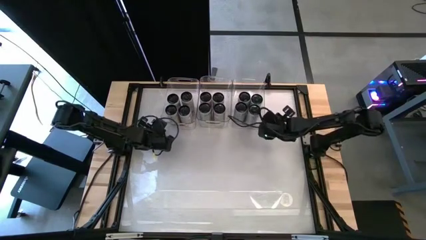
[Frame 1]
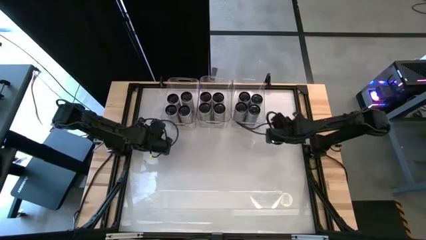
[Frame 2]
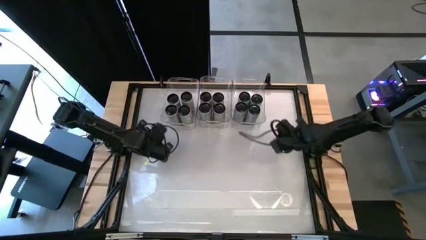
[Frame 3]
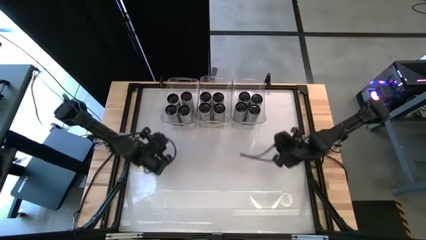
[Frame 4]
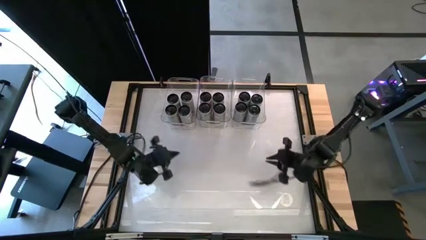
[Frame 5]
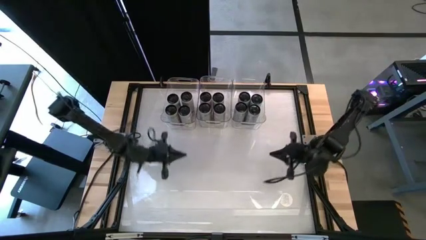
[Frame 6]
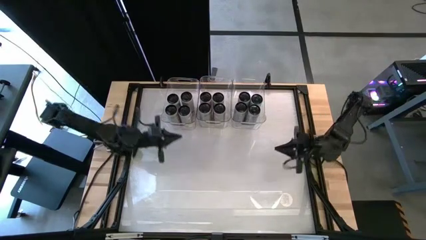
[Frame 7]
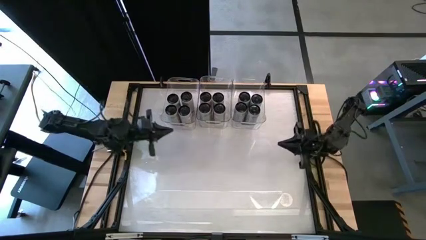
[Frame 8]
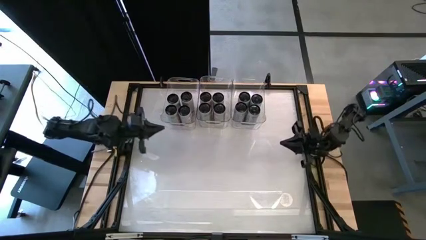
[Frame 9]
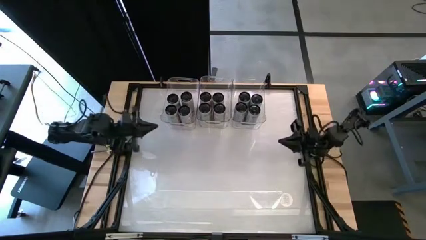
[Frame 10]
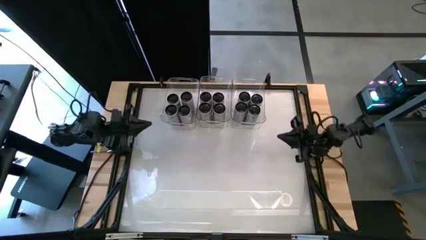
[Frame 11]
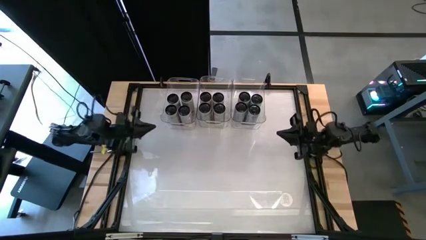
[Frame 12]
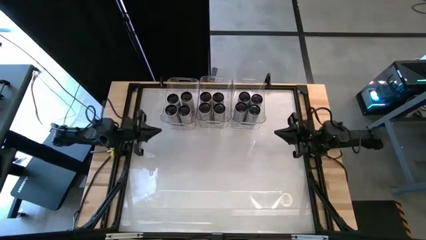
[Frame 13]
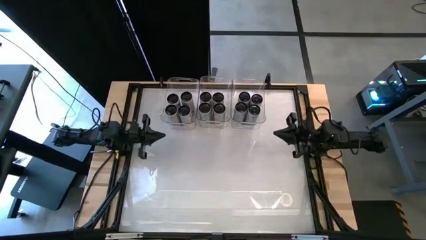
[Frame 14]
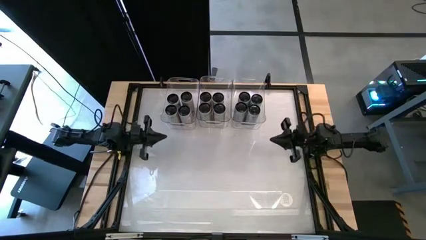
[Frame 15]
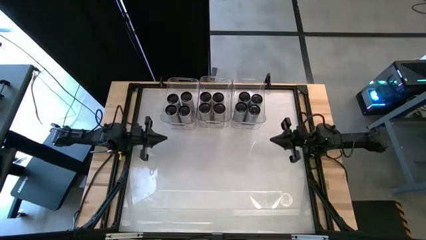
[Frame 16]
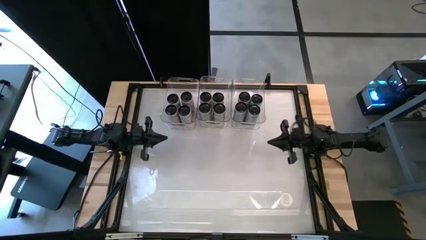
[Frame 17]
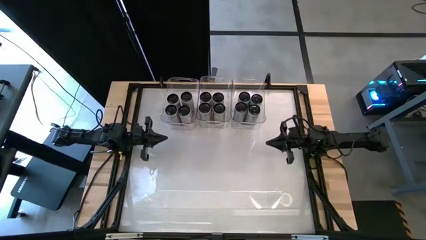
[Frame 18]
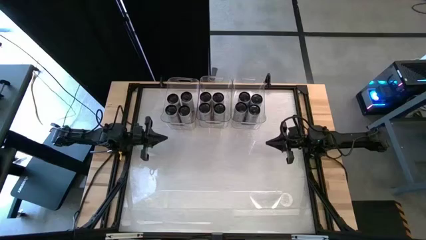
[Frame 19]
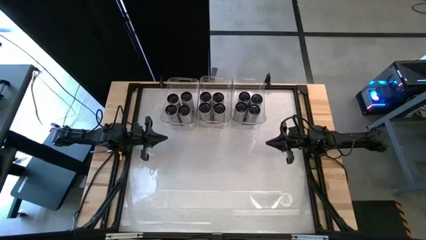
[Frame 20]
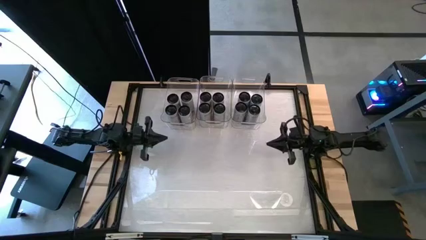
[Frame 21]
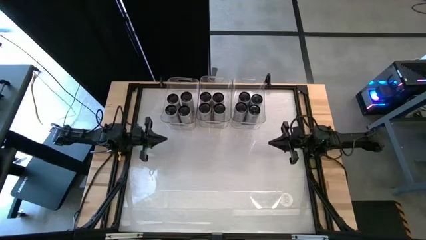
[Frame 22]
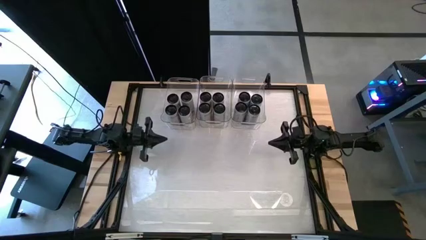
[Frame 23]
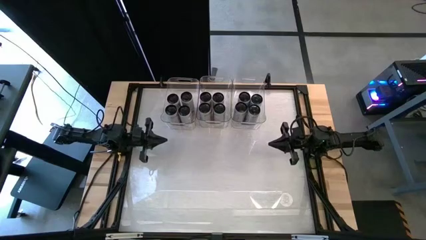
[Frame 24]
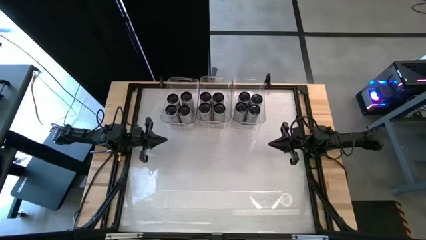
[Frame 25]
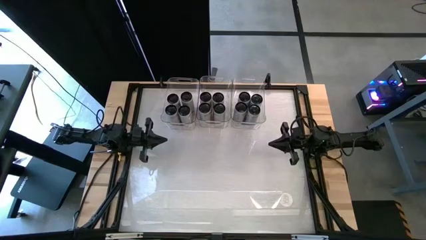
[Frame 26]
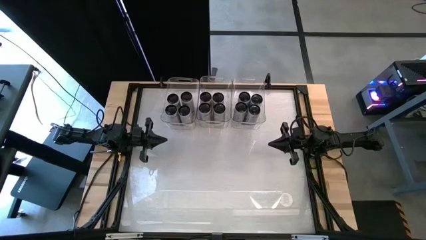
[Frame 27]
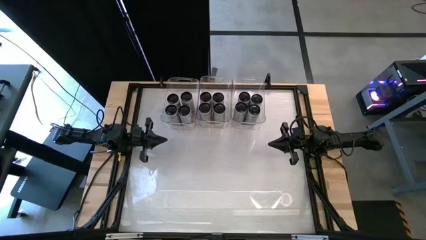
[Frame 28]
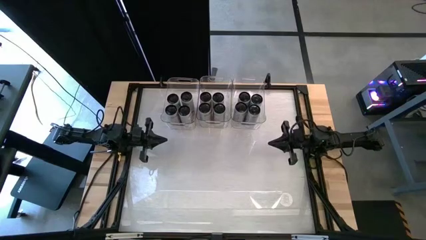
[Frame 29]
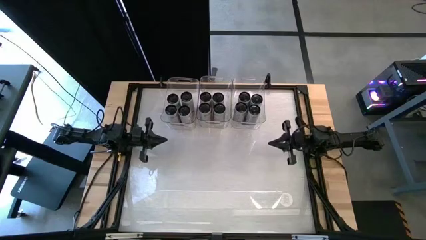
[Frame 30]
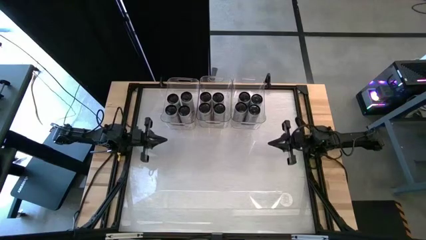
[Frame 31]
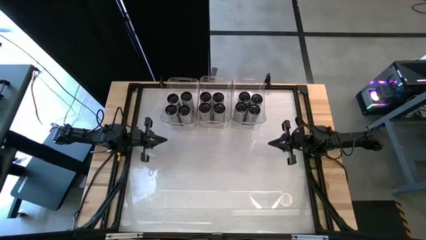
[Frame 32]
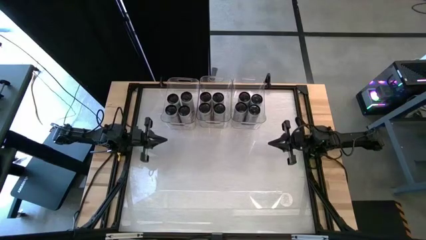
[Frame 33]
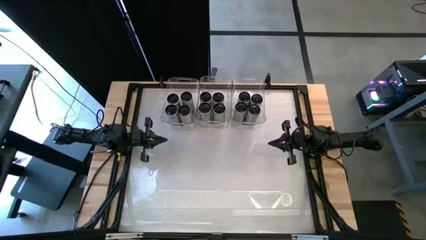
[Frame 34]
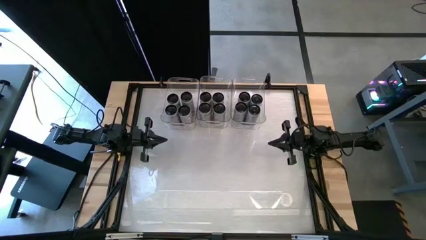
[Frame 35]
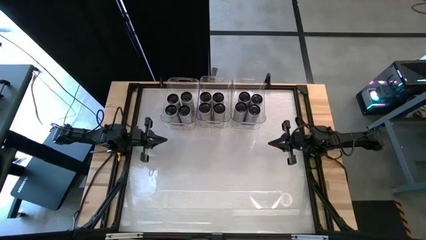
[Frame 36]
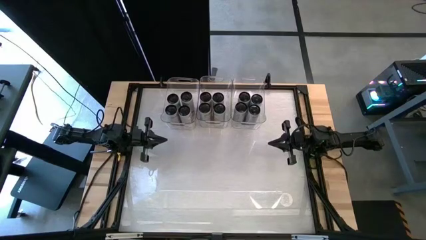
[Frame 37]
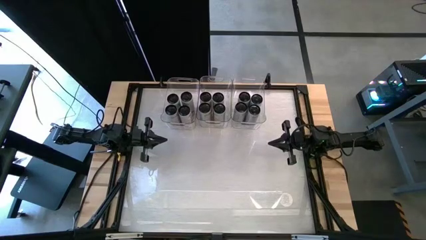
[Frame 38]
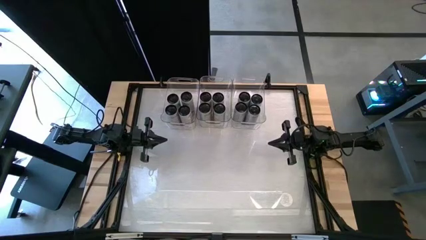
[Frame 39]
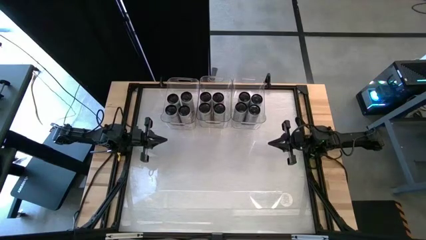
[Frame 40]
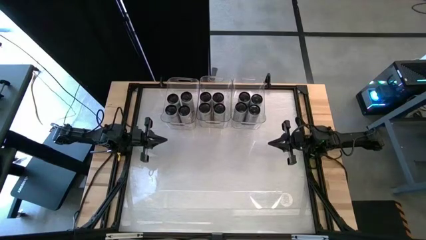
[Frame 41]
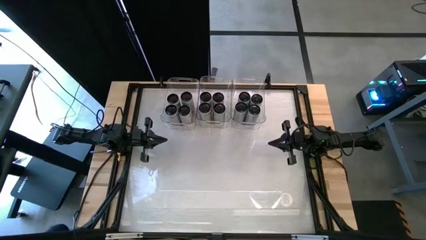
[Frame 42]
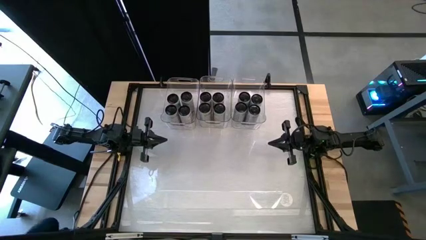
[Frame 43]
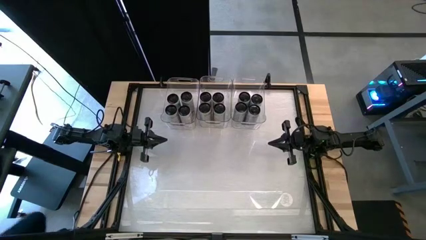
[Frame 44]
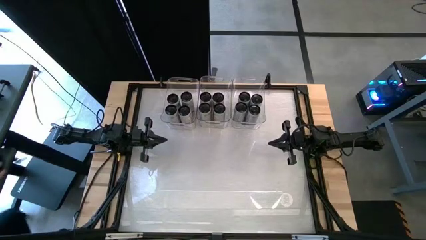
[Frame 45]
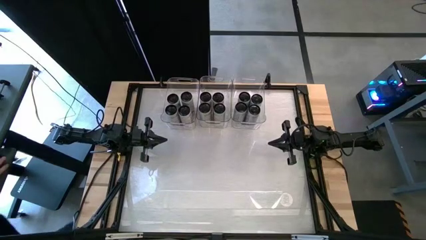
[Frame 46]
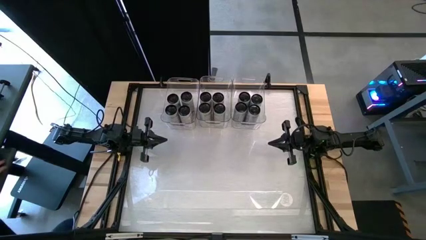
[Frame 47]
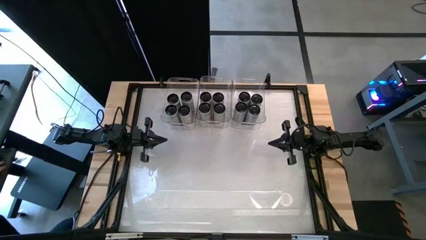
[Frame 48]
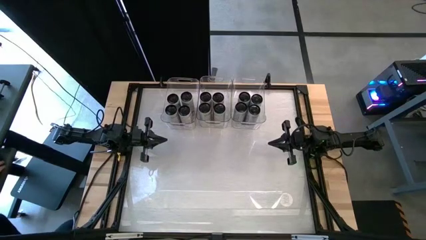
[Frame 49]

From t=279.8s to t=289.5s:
Task: Sort soda cans
Return to Home Position
